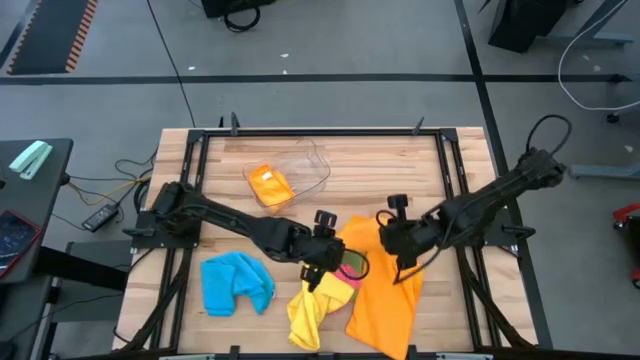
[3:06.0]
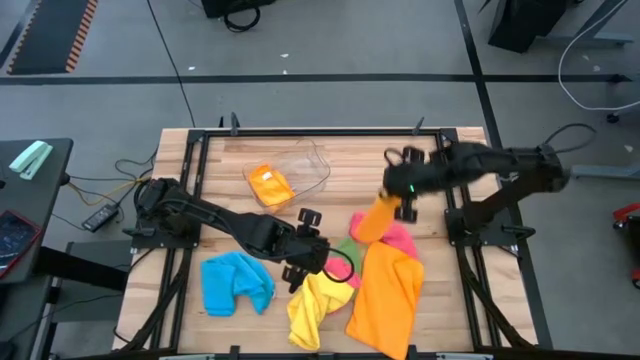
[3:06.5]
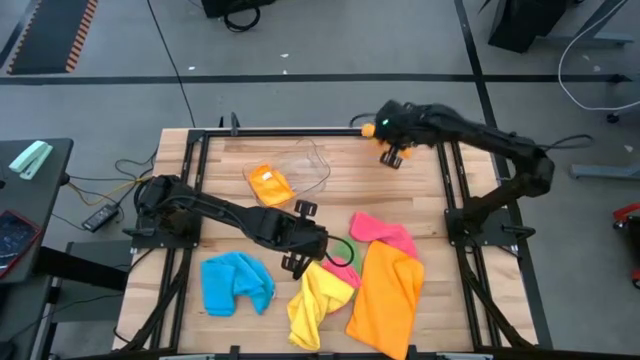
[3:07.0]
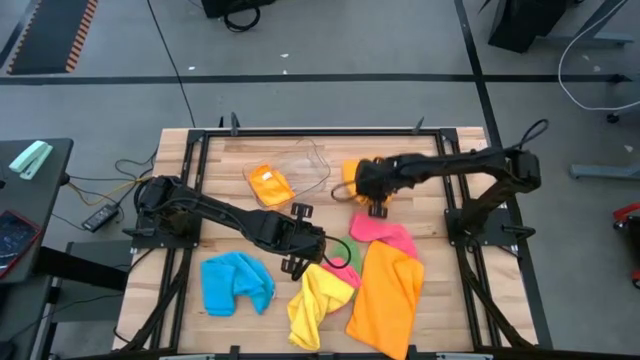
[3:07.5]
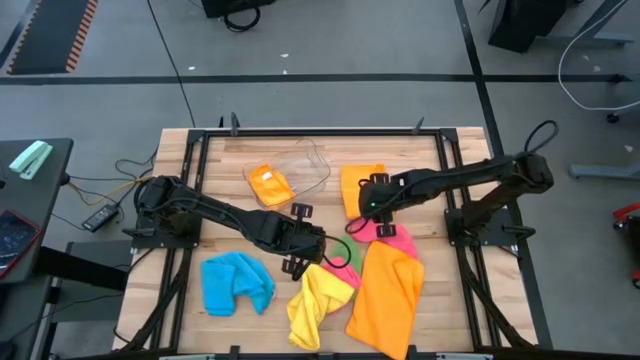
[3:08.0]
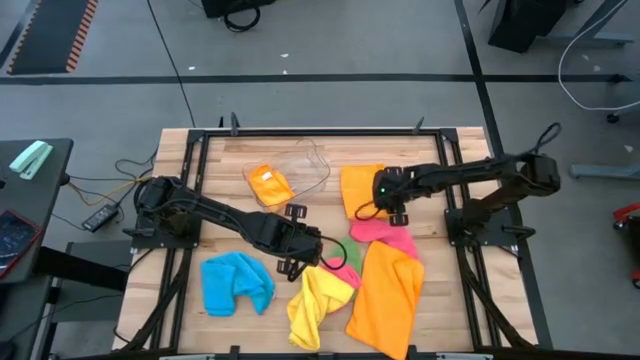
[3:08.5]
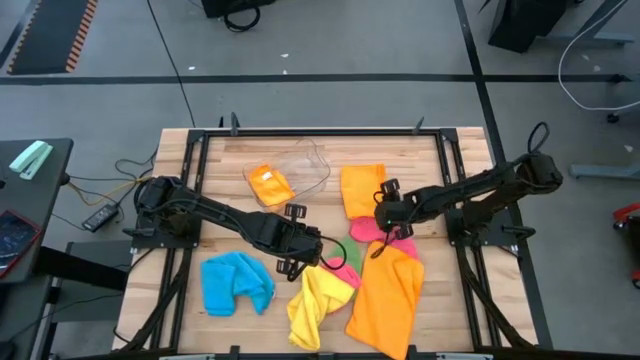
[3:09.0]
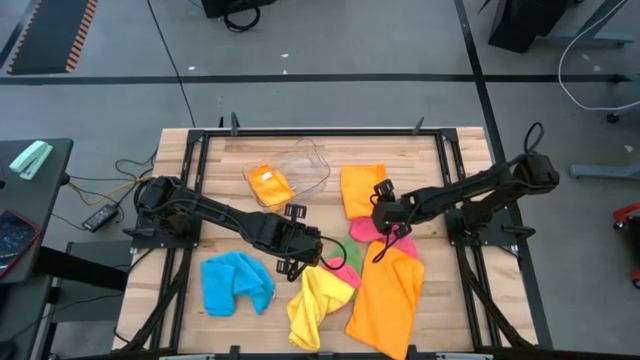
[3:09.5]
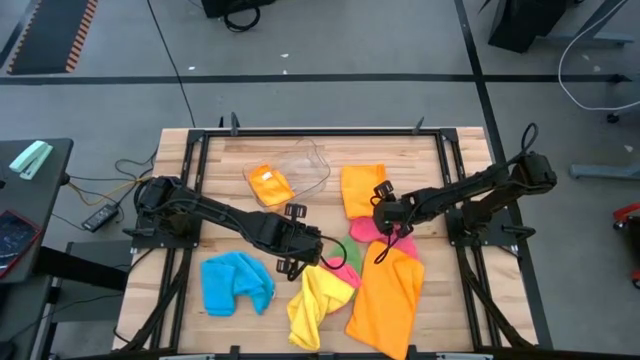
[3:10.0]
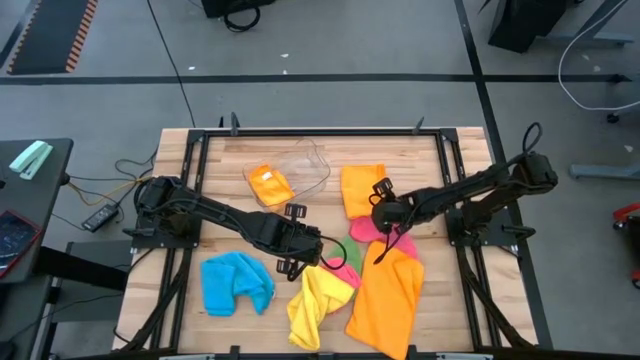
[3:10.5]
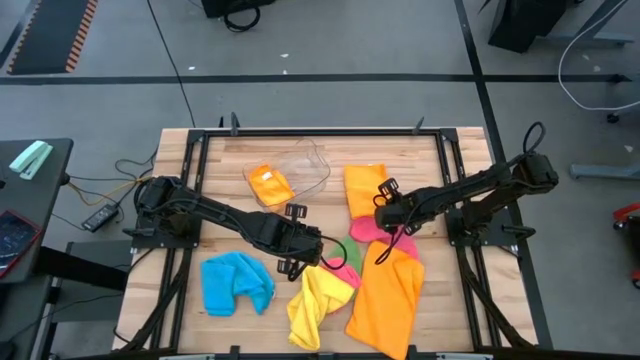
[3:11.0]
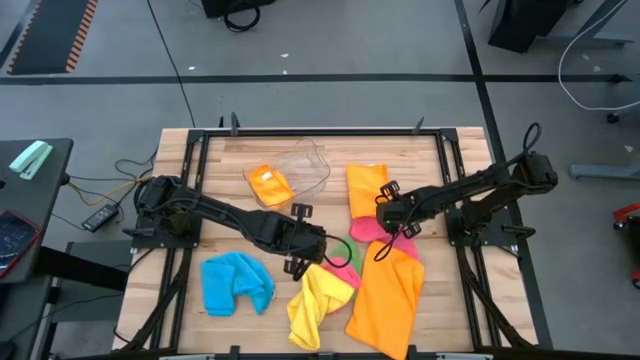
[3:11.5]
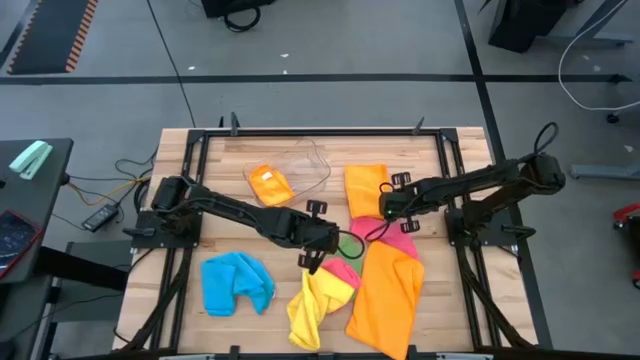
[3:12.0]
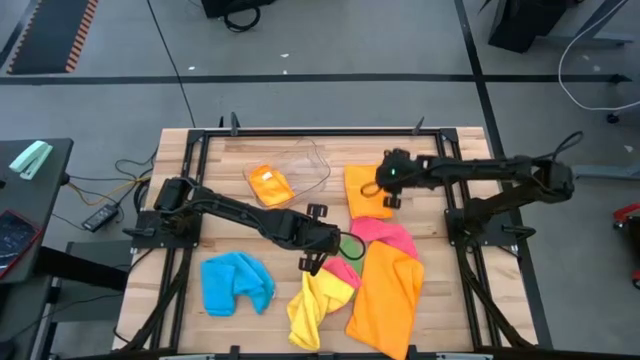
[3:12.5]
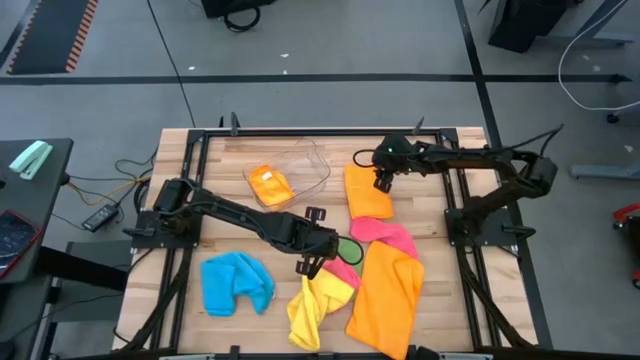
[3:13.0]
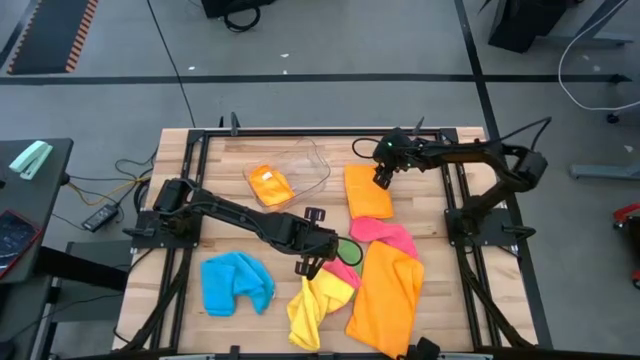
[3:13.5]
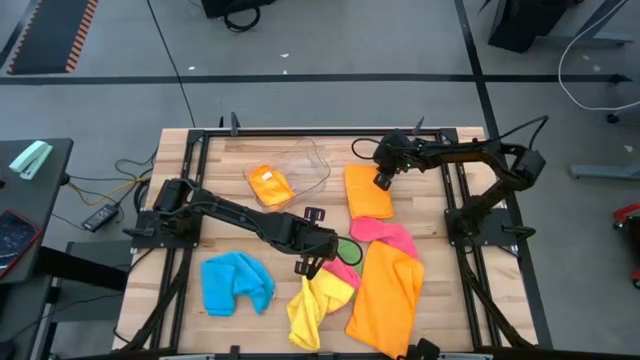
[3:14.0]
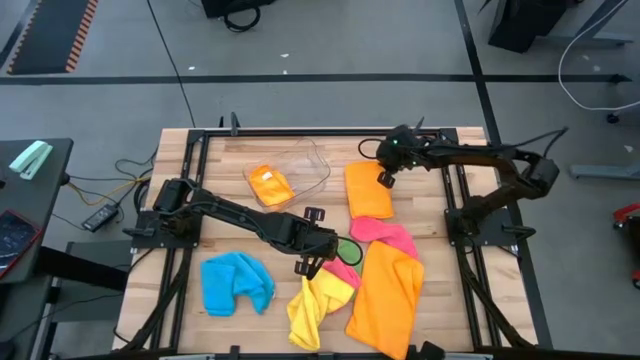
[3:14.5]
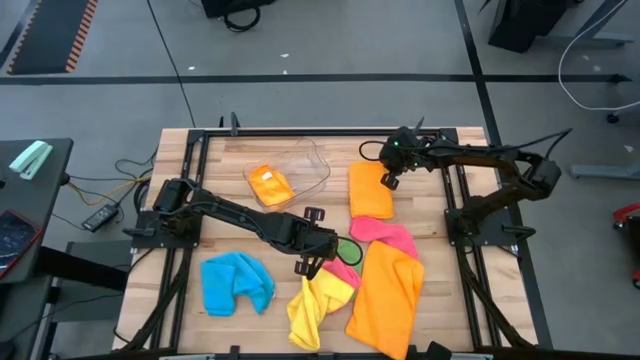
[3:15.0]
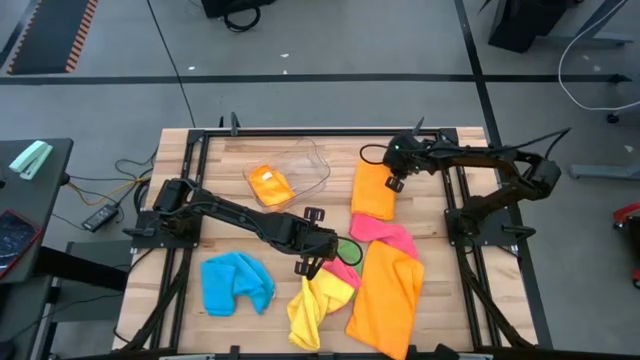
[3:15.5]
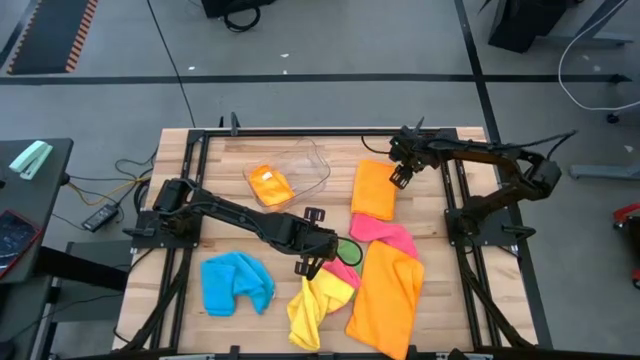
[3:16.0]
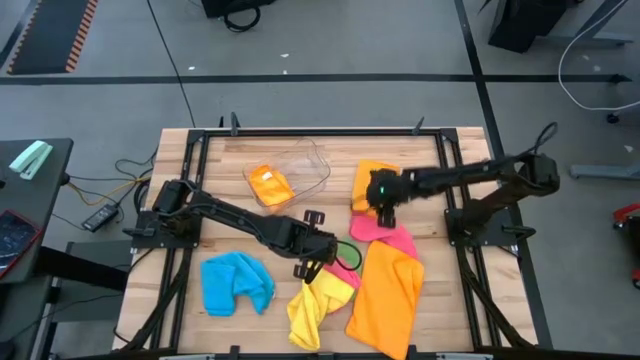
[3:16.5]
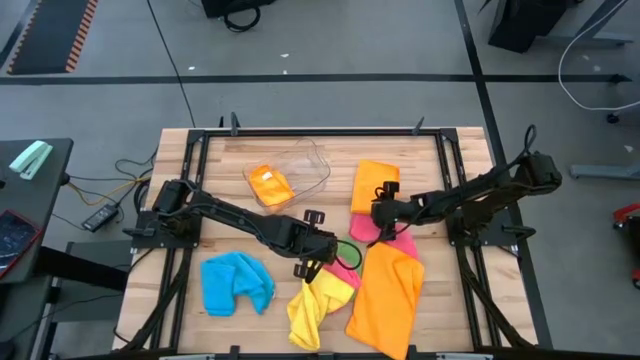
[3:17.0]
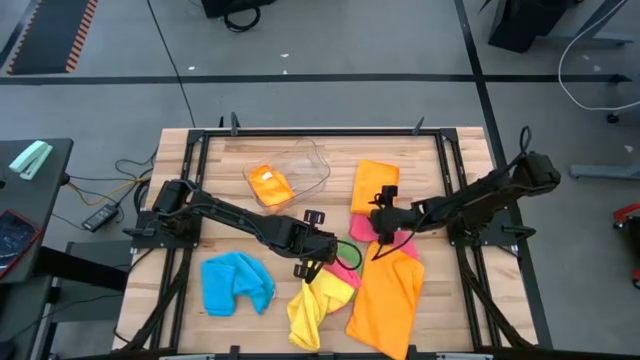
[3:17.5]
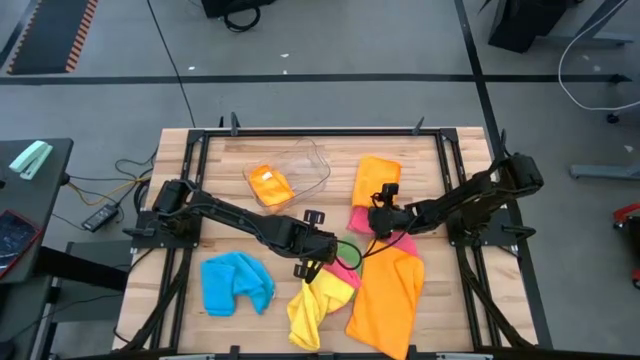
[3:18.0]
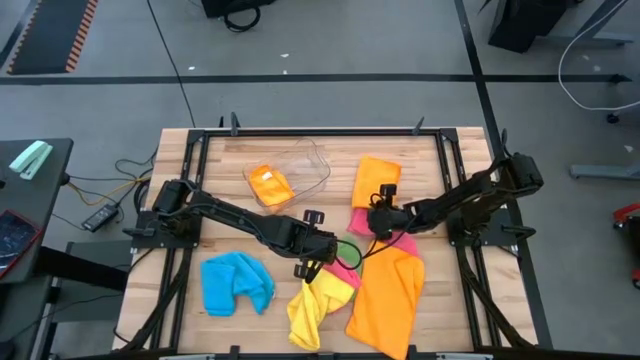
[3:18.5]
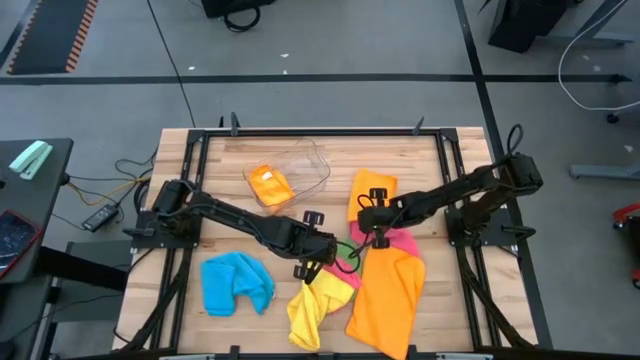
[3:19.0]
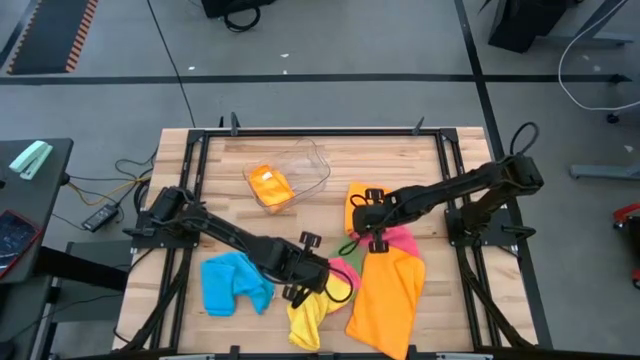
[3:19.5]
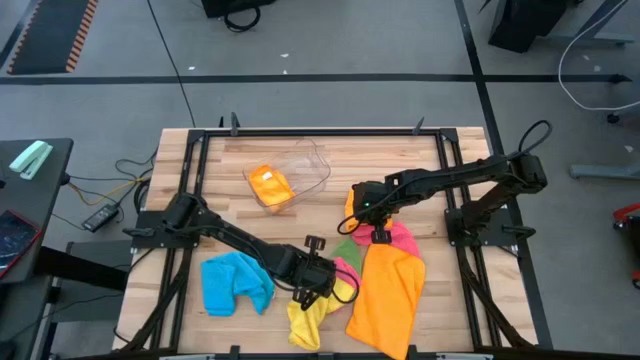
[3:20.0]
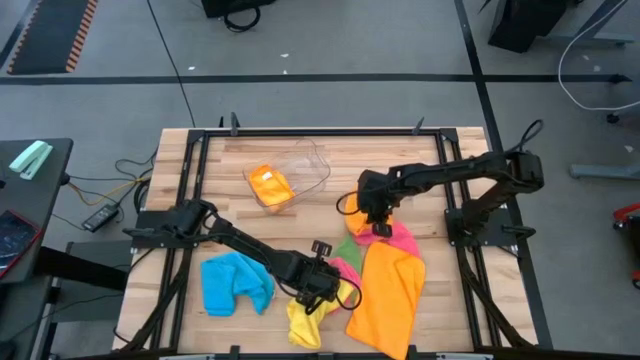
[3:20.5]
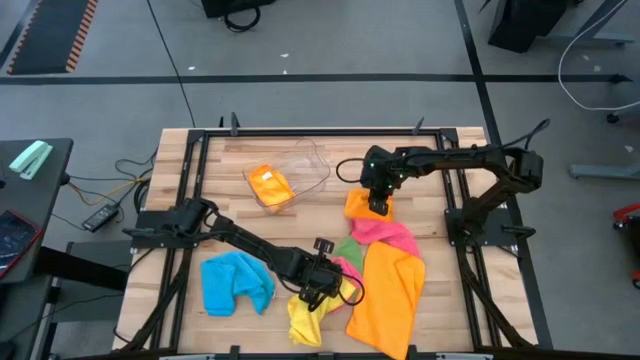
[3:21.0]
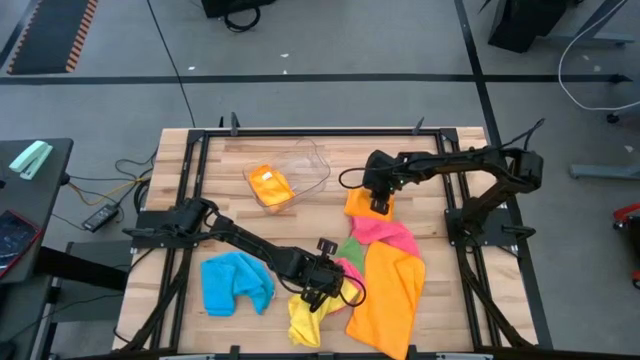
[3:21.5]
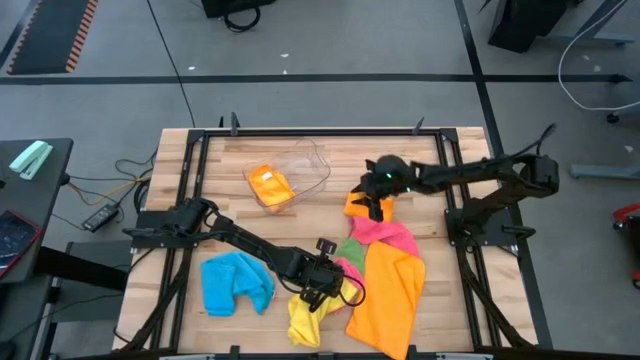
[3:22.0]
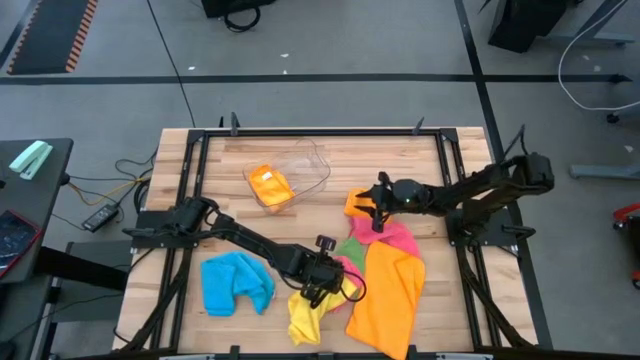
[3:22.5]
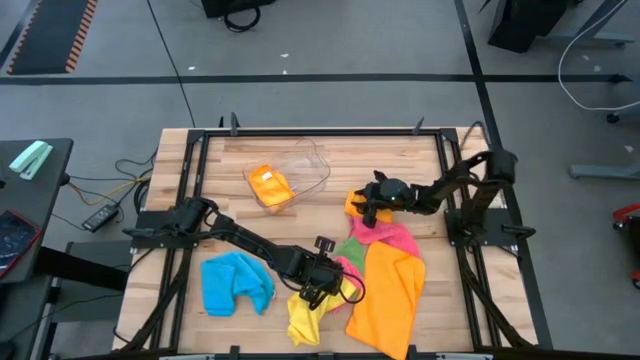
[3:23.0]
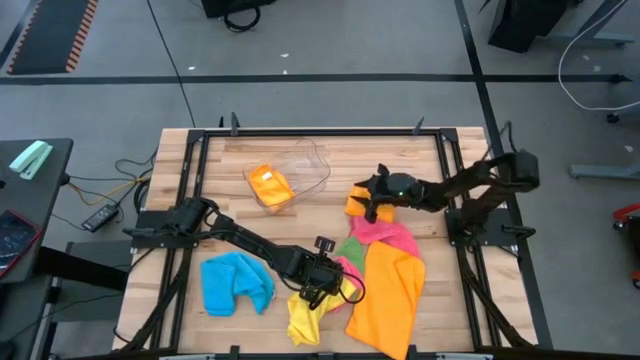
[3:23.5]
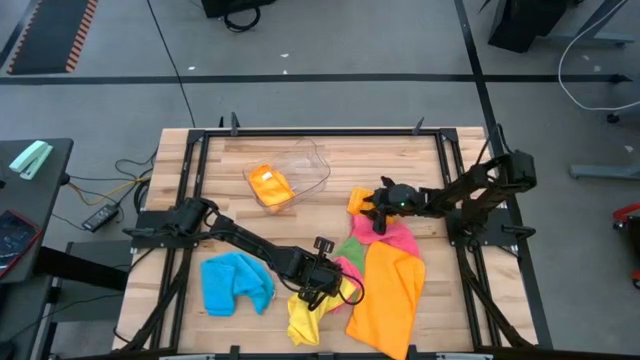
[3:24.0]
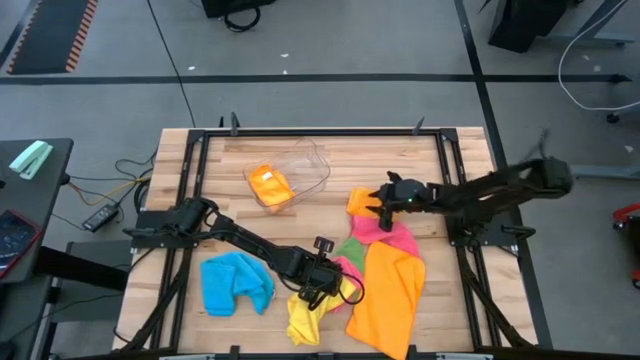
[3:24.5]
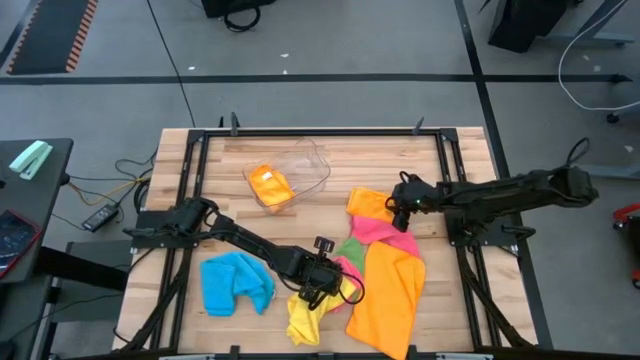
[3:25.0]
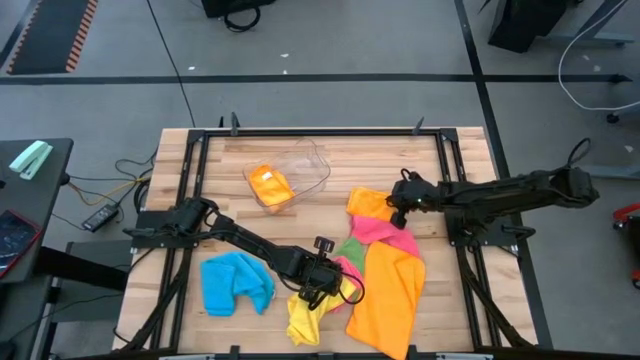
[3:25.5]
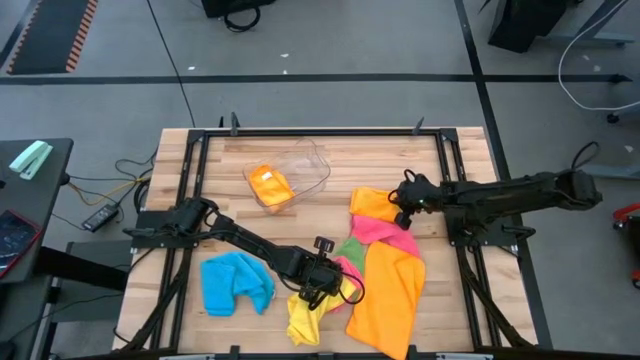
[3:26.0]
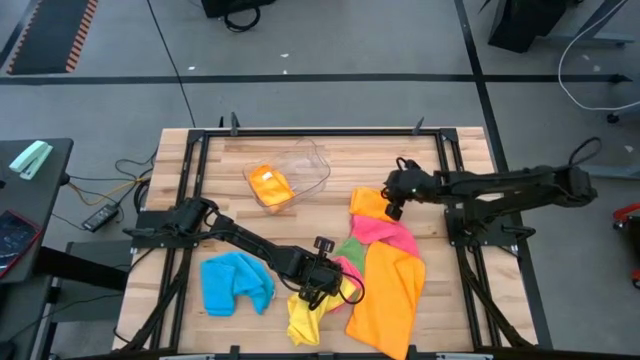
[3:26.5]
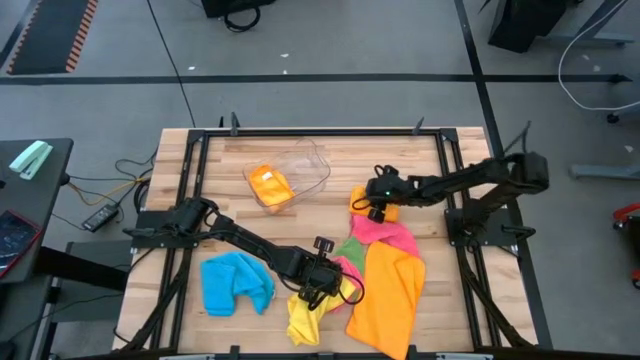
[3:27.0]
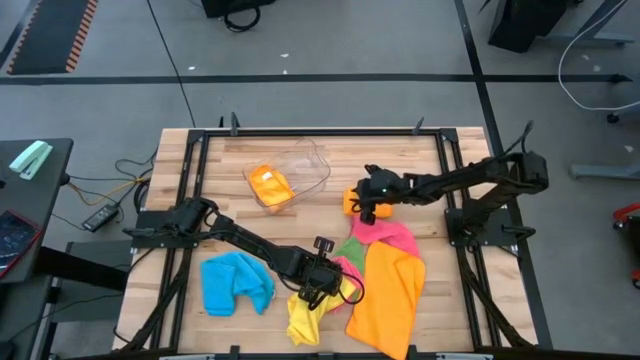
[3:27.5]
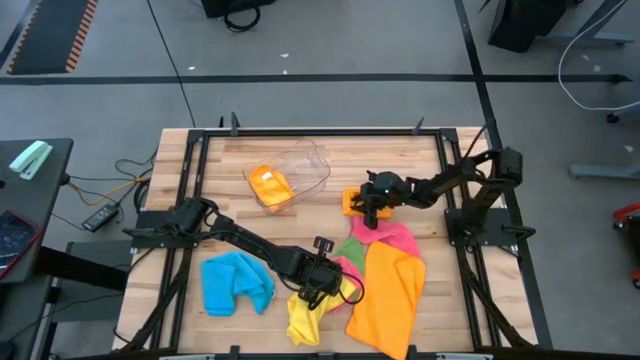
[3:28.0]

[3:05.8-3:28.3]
Task: Fold microfiber towels
Fold the orange microfiber towel
